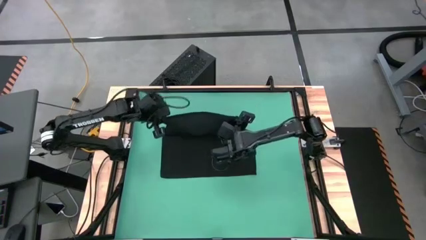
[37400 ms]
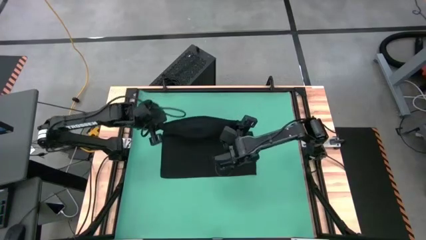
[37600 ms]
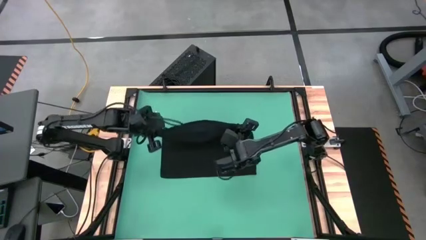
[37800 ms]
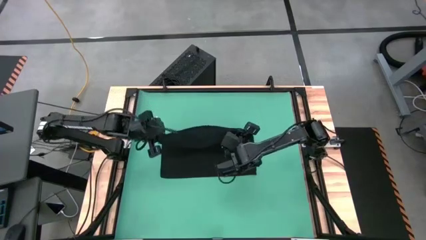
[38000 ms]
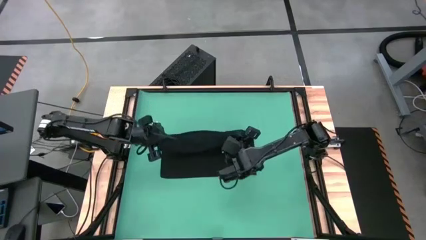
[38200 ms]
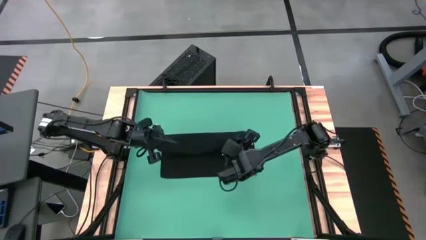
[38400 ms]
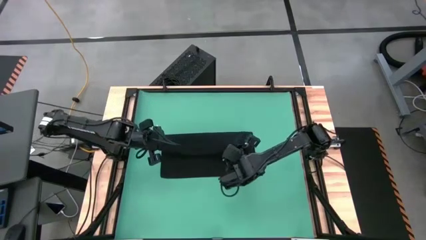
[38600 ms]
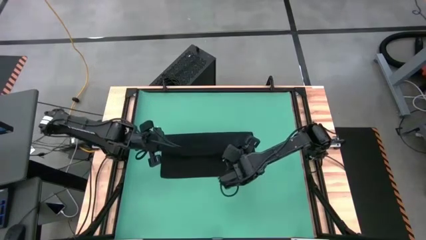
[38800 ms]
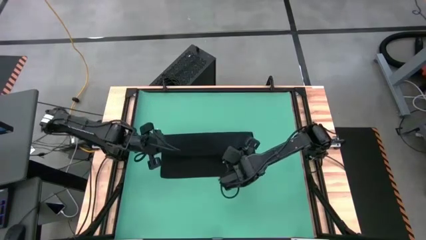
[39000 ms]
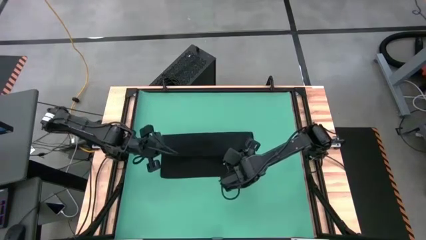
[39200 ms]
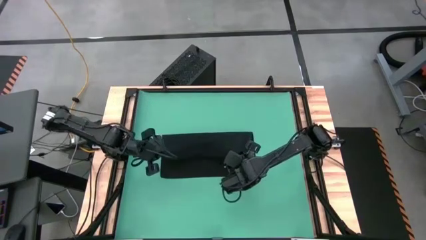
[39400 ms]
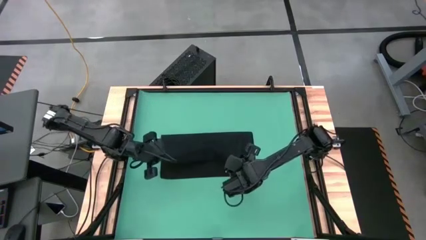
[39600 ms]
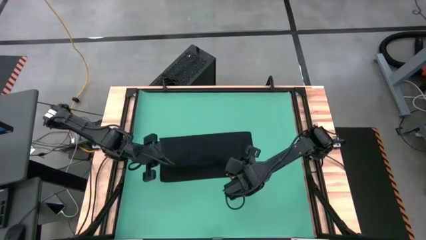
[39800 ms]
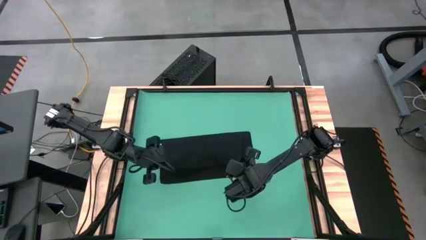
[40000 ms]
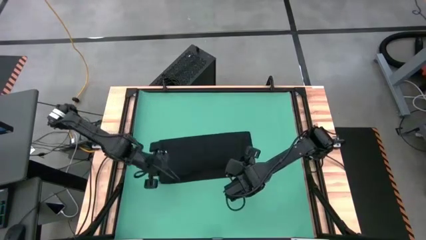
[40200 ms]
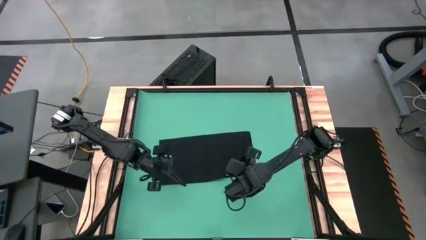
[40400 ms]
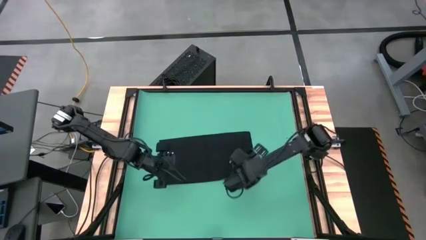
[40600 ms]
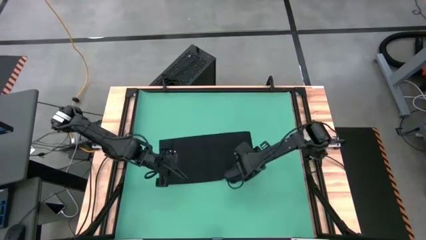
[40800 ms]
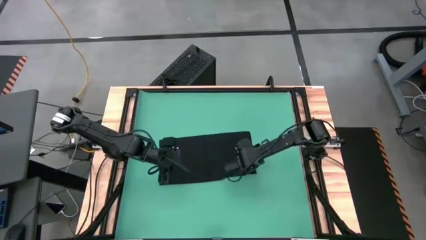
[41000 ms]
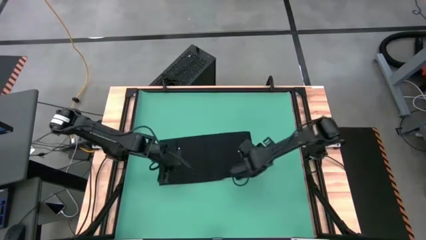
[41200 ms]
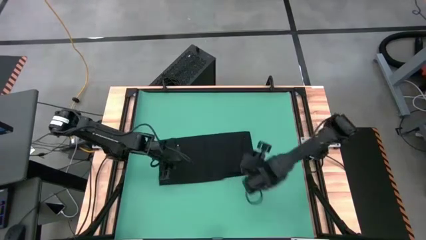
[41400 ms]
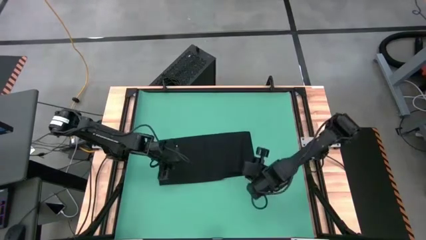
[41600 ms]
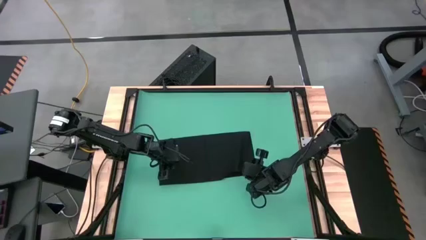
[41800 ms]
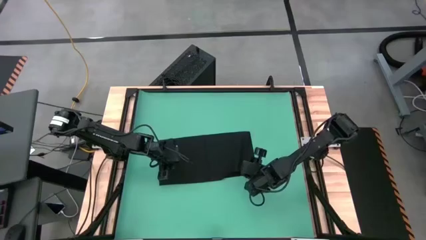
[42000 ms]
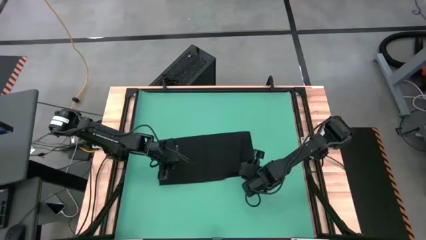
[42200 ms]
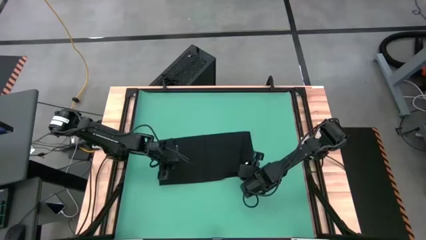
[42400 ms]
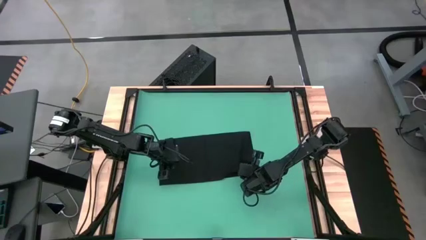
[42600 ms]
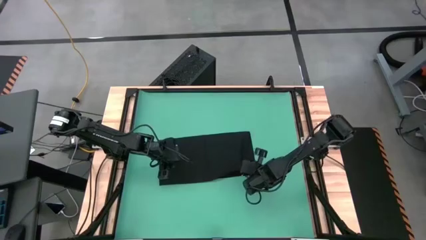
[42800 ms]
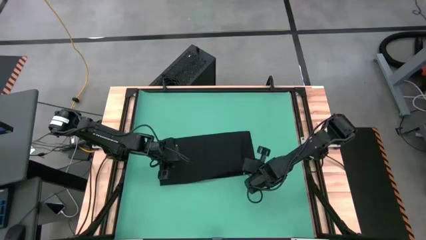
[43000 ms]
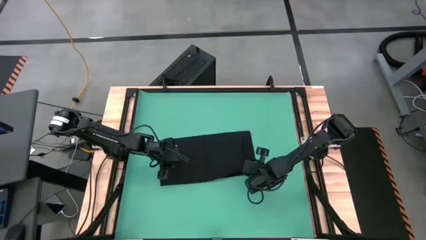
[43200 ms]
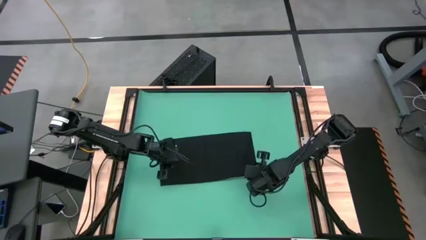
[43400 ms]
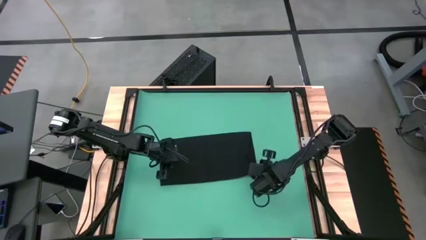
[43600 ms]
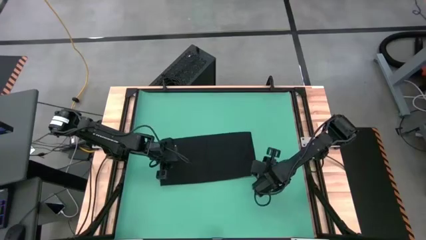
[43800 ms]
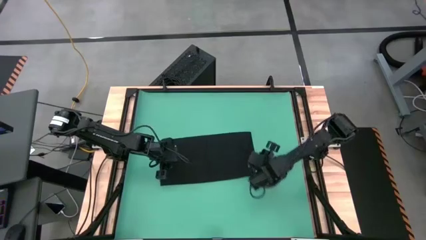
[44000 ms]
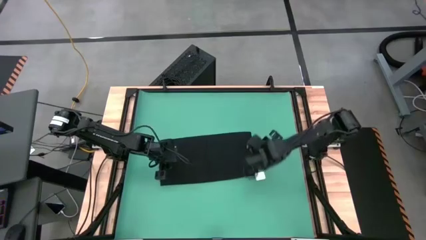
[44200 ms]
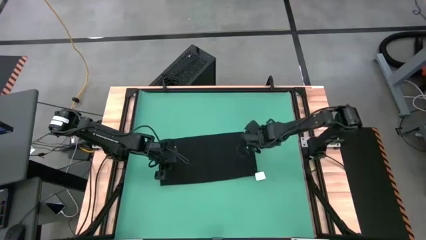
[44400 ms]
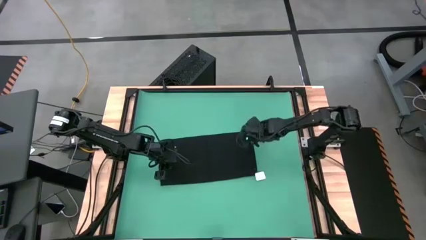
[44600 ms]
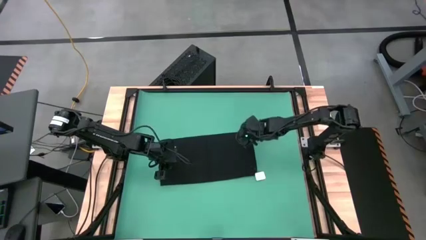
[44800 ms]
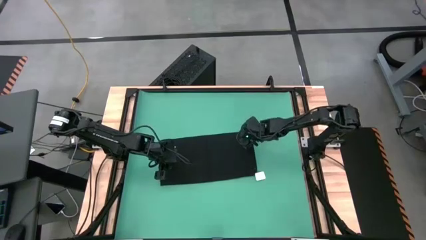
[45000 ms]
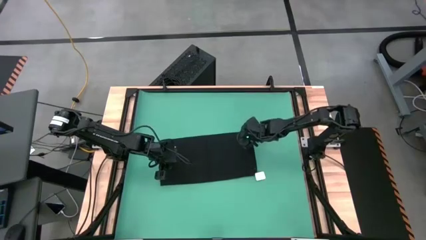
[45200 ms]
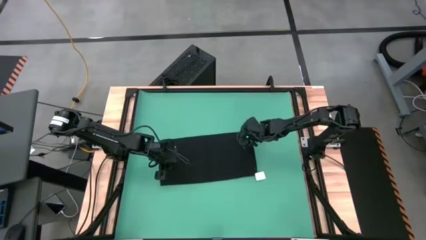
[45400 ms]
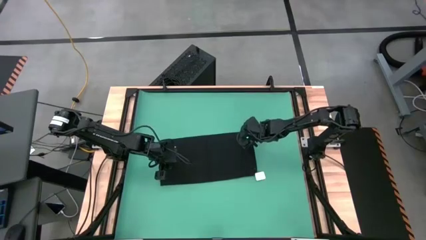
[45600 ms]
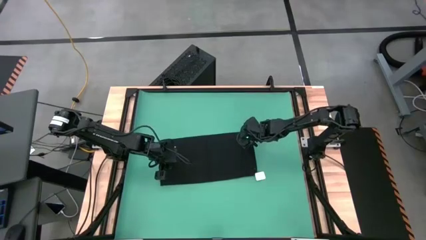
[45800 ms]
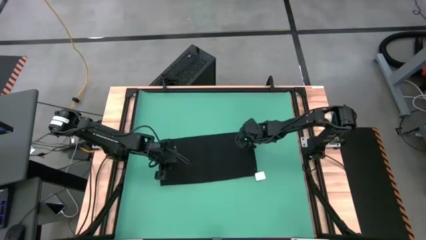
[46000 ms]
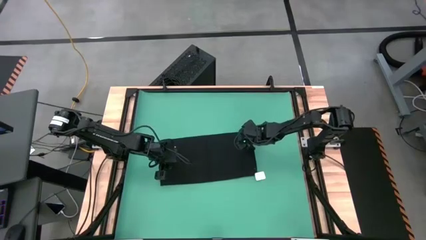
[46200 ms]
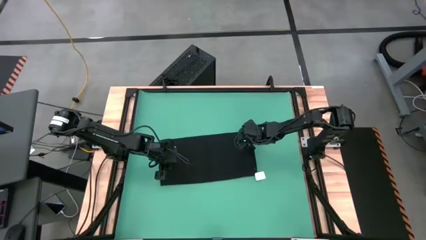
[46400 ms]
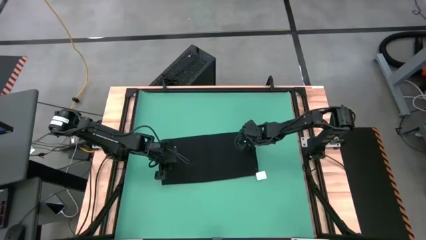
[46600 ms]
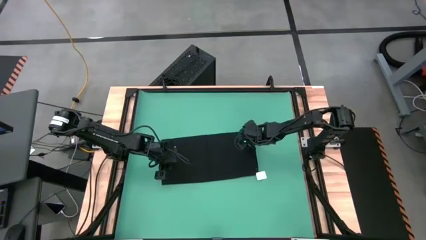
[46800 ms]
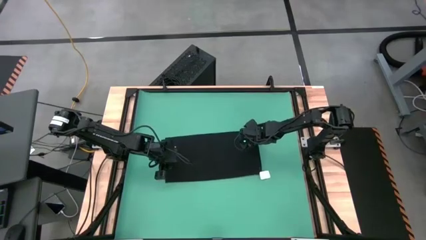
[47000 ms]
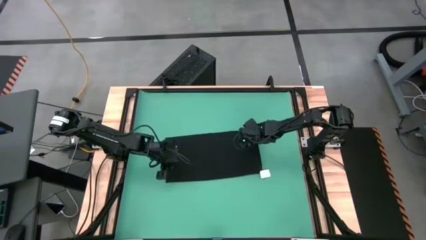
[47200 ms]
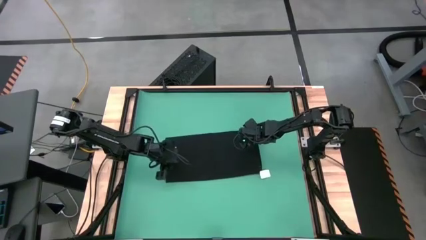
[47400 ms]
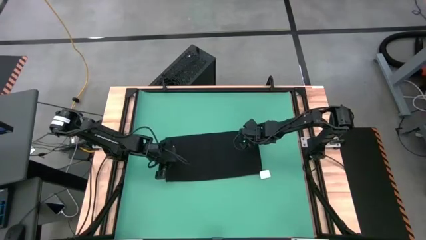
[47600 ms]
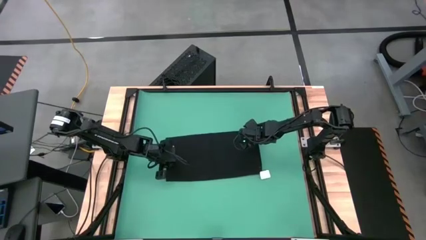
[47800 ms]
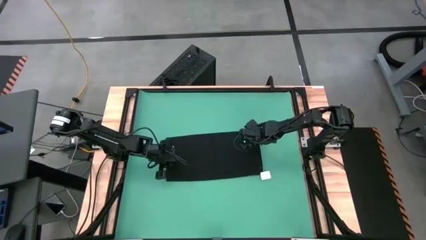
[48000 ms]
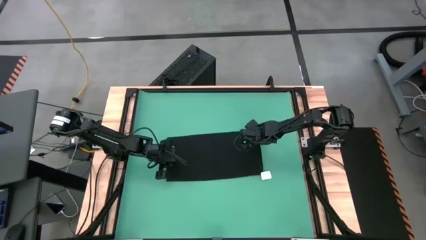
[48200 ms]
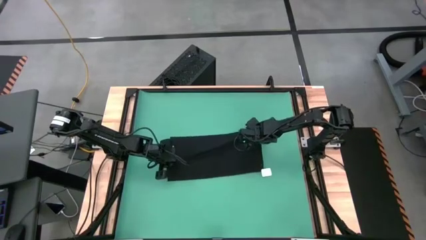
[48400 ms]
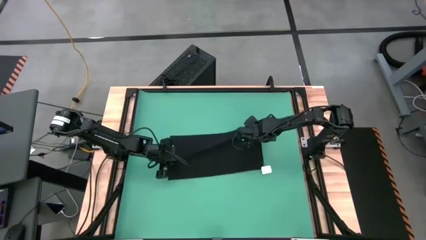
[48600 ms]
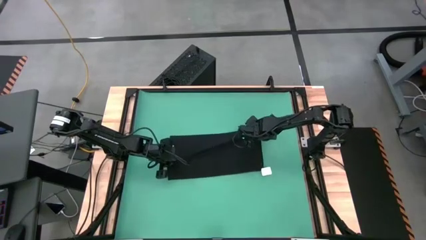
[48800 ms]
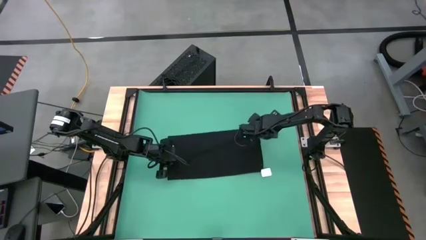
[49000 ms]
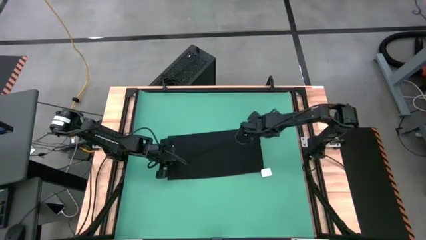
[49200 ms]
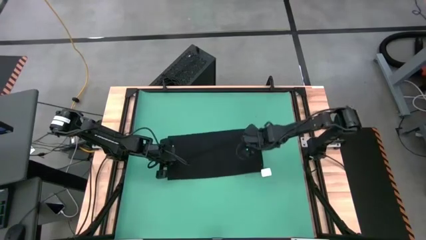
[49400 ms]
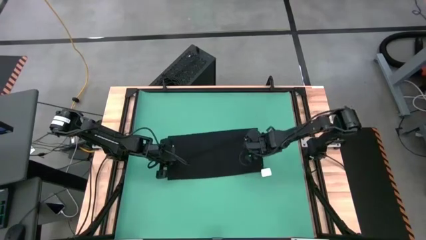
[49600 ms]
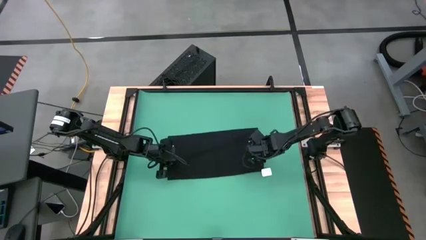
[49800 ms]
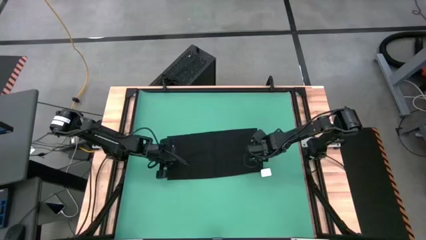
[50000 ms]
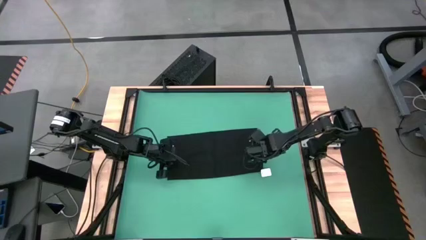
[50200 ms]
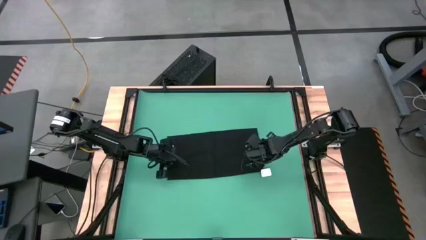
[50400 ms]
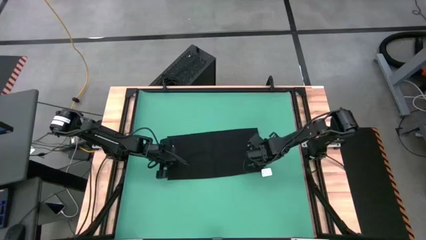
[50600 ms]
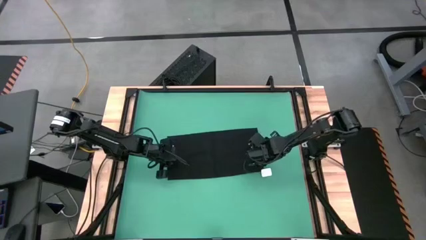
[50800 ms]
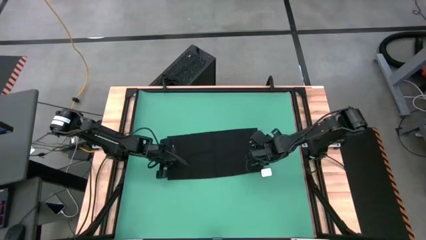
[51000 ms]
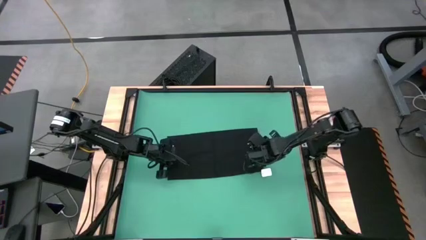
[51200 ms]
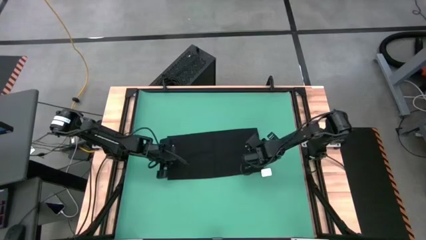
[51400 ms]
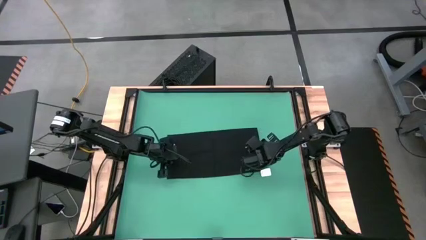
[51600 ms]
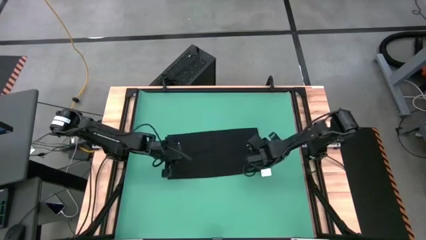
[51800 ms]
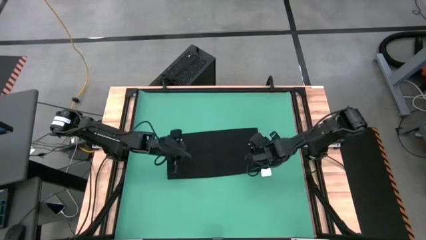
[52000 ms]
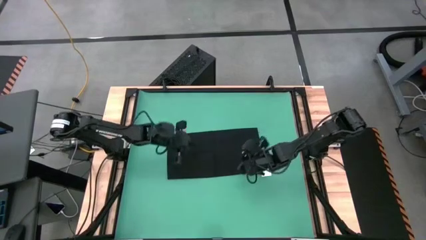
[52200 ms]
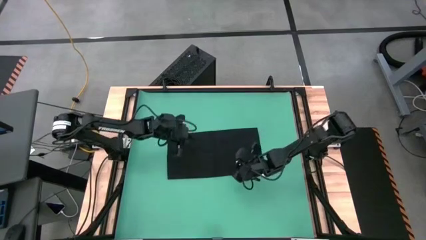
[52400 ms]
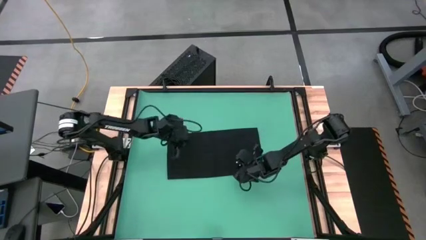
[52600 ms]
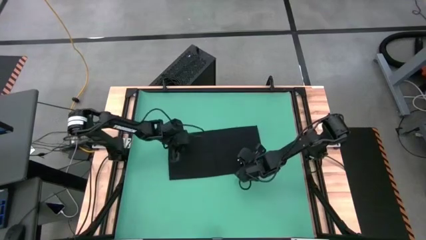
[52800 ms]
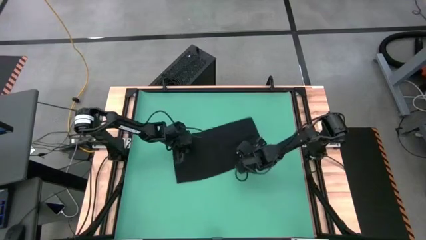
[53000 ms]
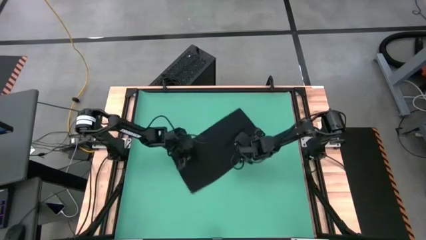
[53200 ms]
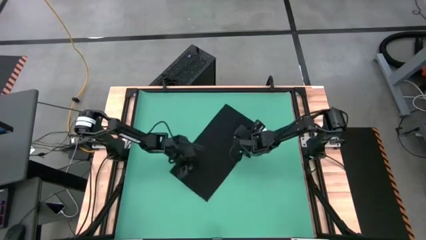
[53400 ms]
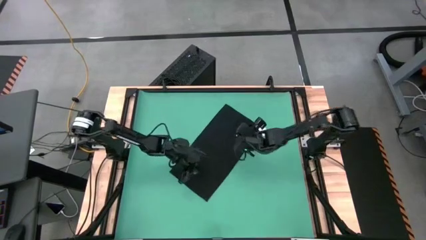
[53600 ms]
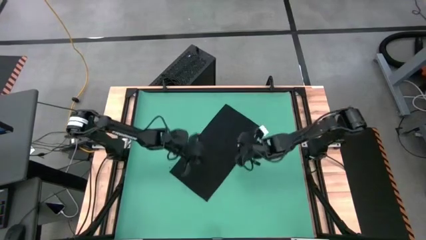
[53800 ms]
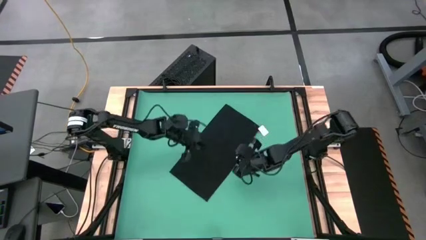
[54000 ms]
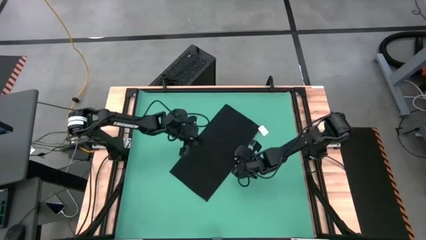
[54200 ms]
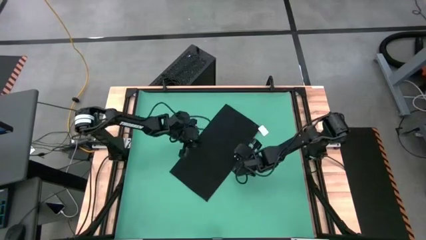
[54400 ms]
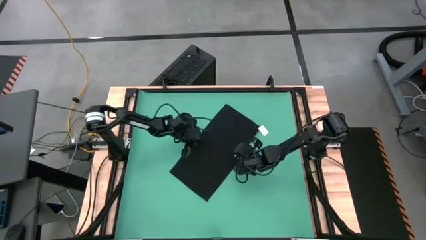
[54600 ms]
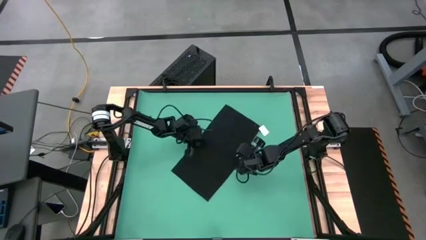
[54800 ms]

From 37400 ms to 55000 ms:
Task: Roll towel
Fold the black towel
